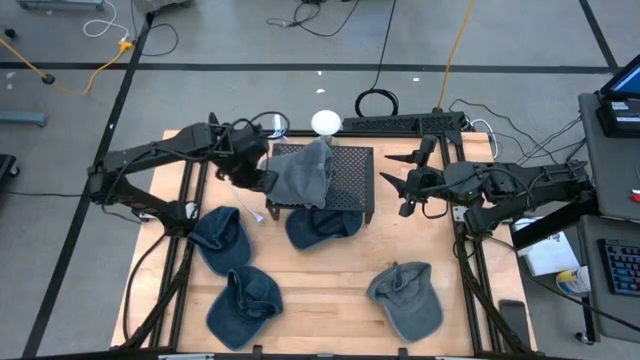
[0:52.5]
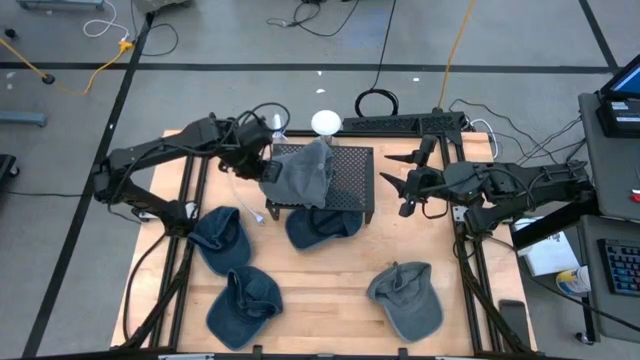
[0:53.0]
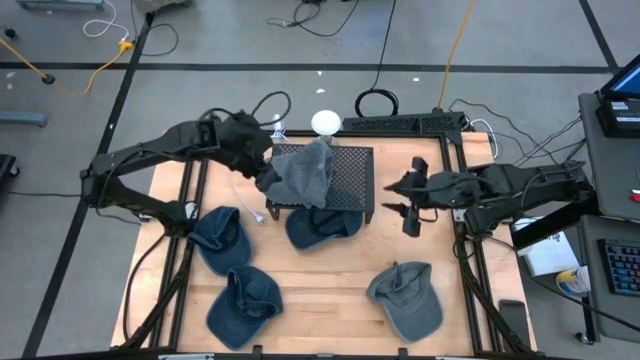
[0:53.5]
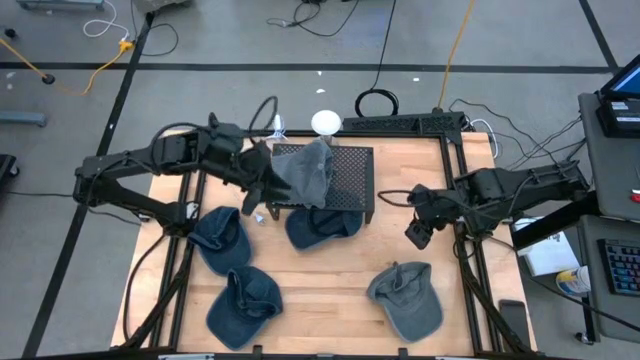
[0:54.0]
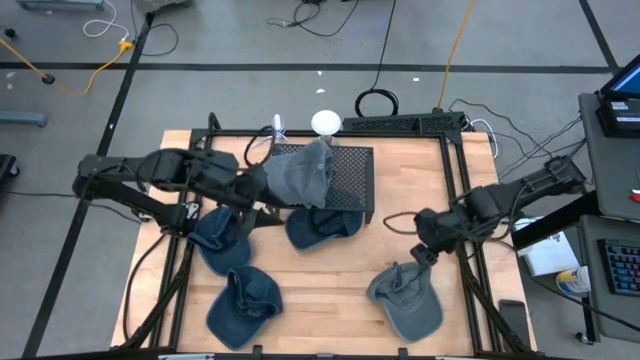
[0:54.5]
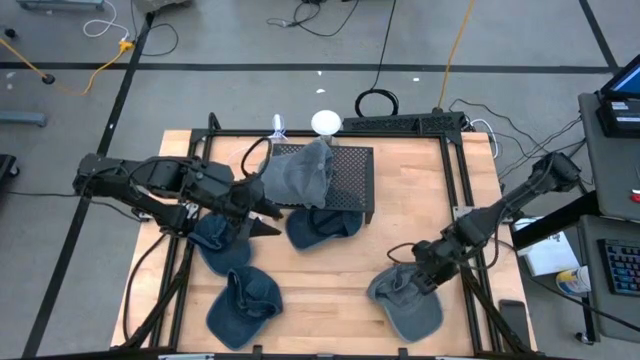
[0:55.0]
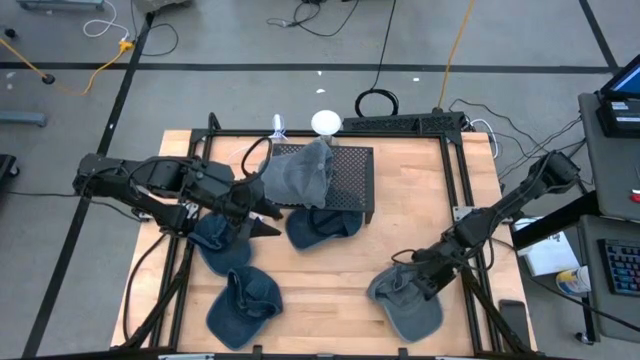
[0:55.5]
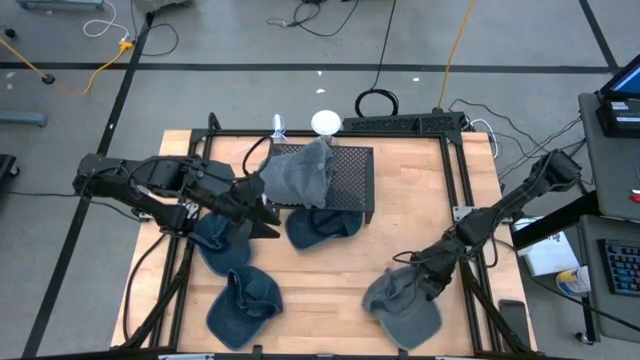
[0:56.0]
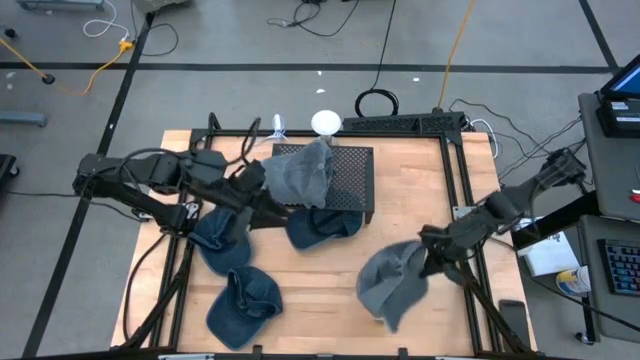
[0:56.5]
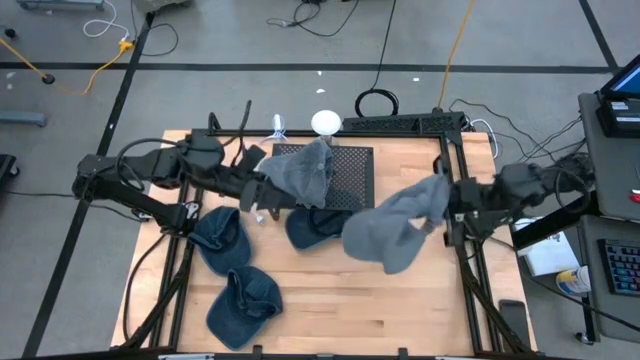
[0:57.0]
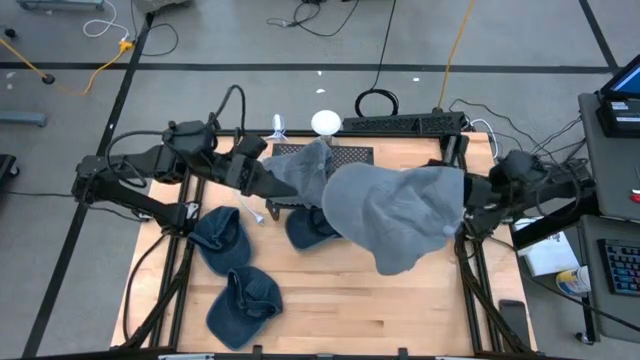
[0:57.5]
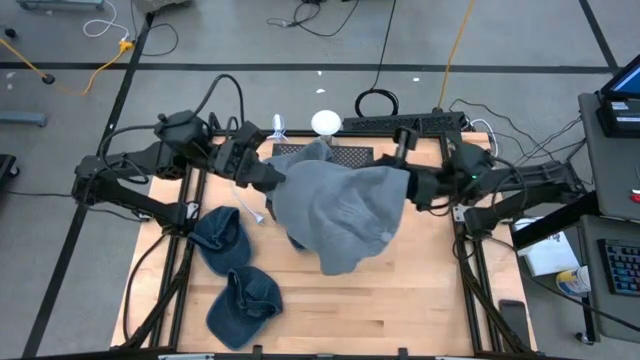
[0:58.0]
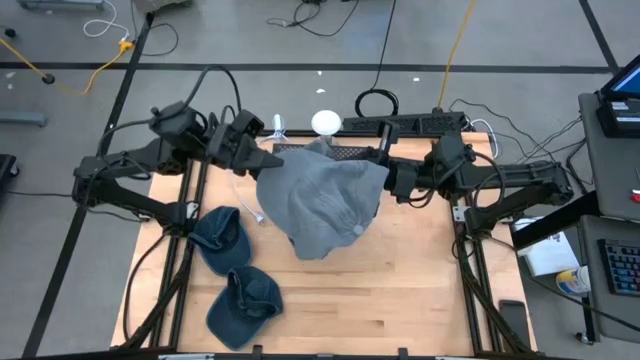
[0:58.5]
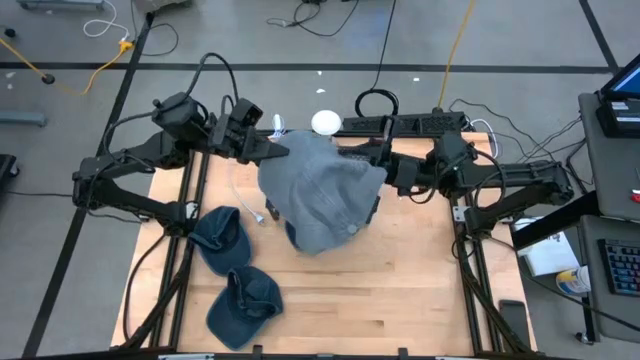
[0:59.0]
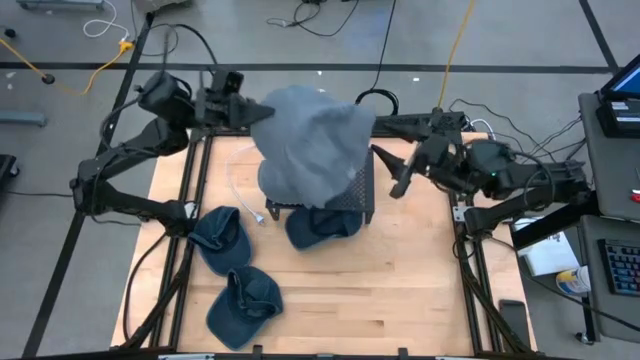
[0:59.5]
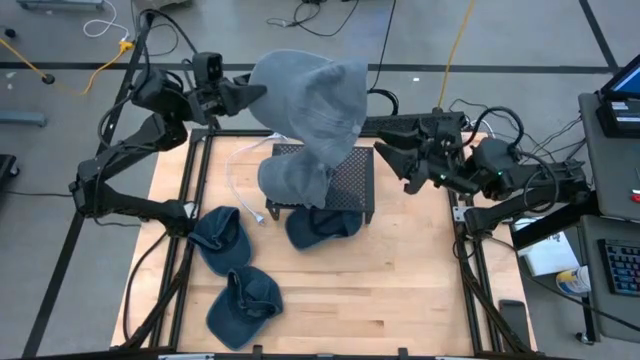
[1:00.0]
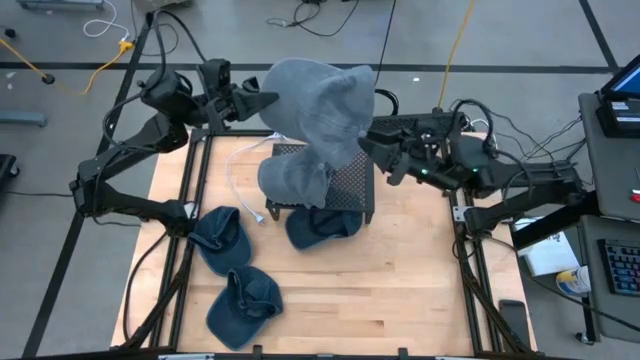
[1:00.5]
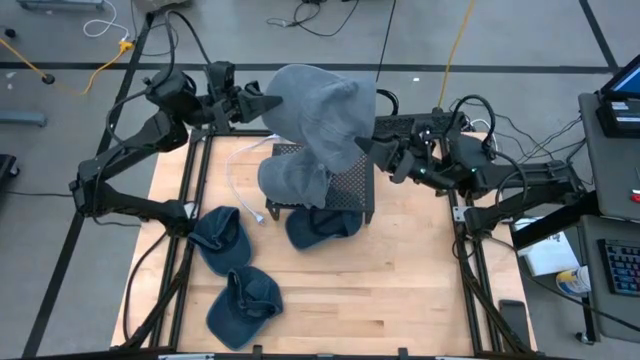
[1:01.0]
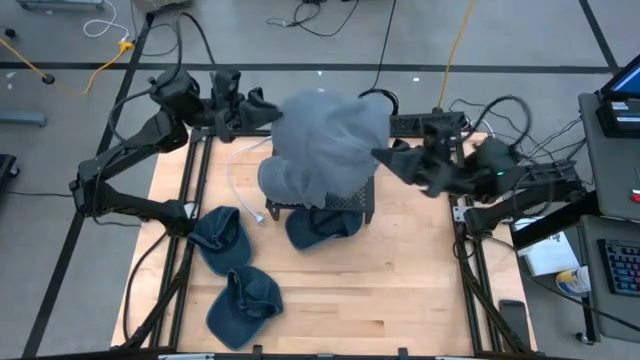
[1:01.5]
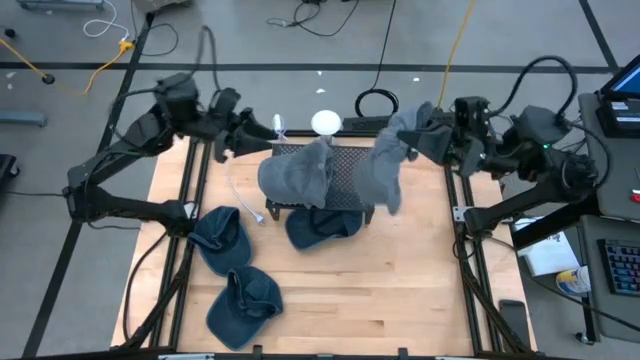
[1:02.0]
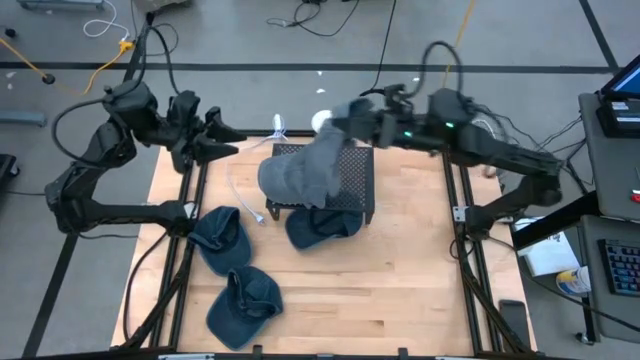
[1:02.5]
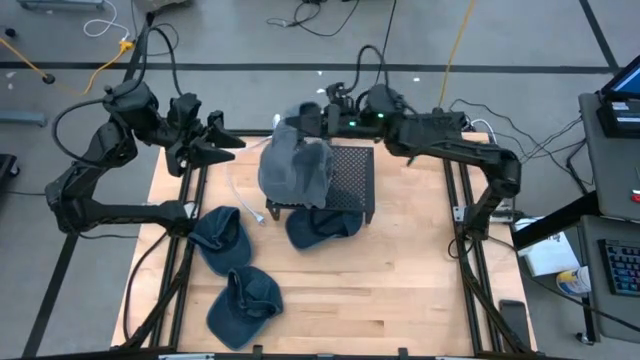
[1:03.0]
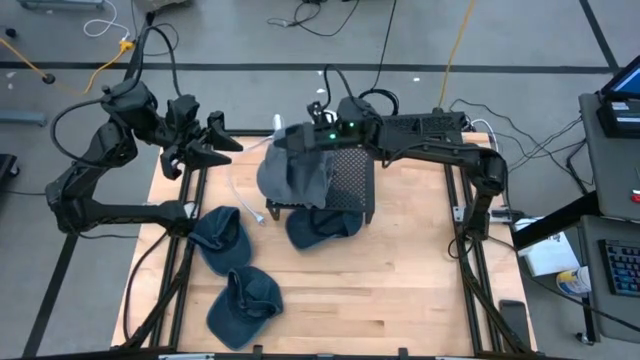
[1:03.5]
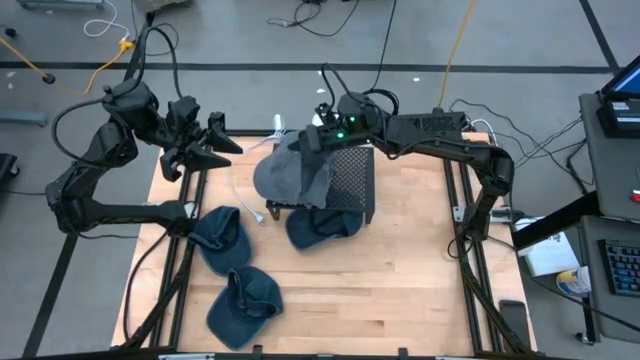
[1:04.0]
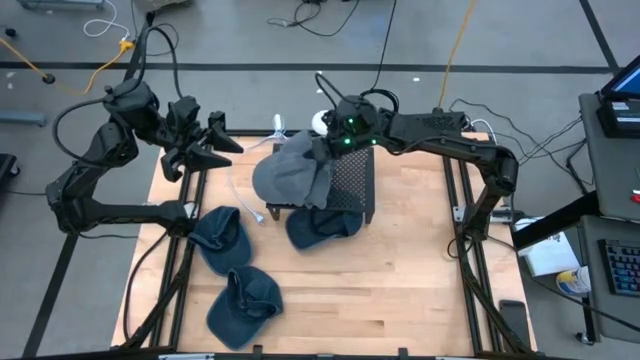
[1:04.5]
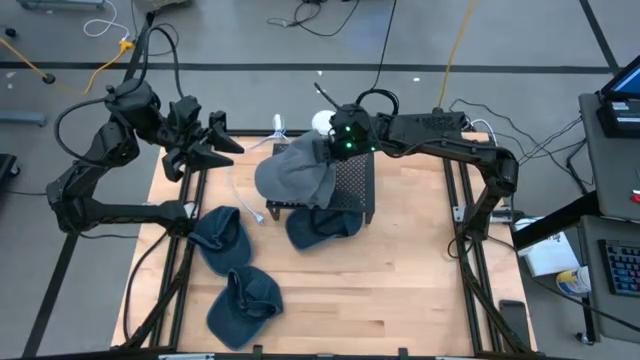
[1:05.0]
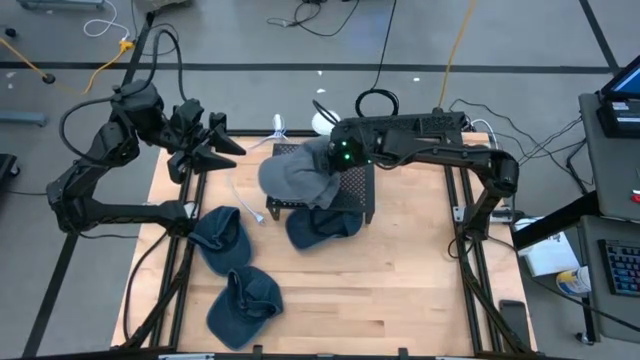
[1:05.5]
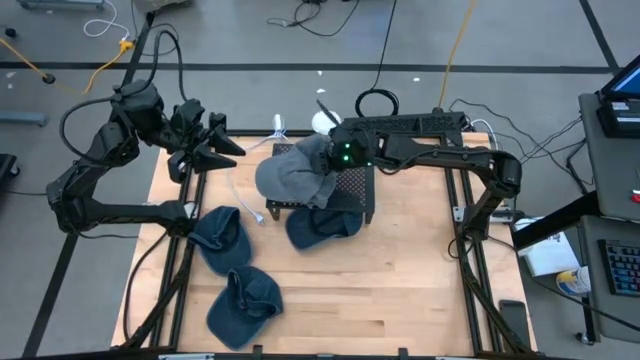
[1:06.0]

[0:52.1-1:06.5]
Task: Pick & Place hat
Stack the gray cap on the gray caps on the shelf
